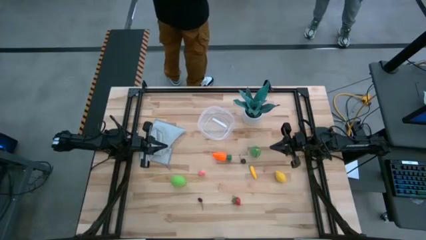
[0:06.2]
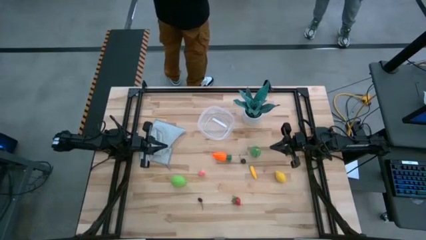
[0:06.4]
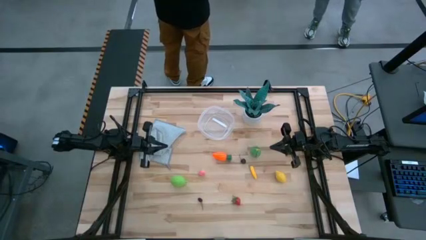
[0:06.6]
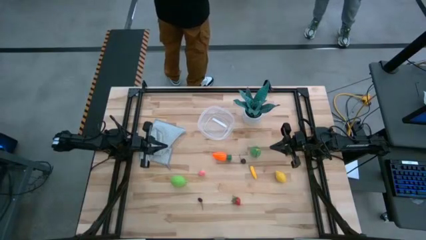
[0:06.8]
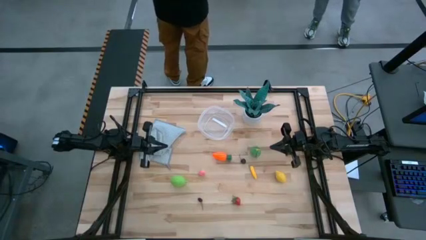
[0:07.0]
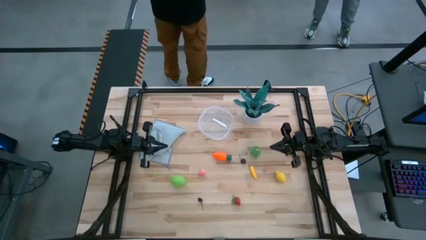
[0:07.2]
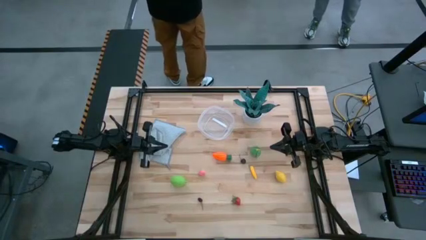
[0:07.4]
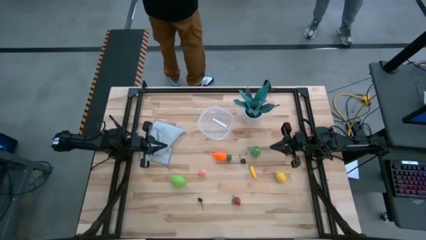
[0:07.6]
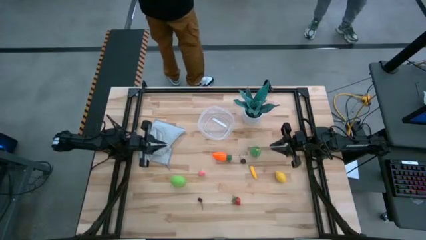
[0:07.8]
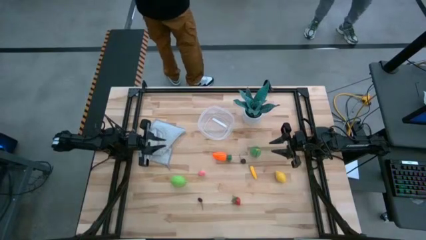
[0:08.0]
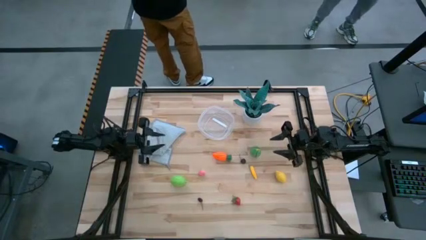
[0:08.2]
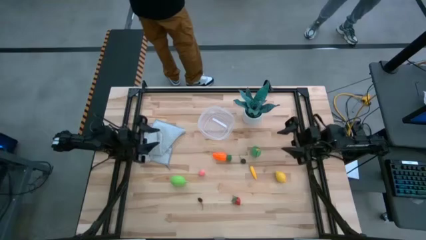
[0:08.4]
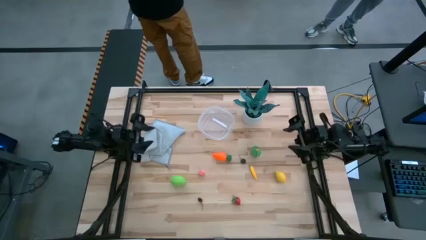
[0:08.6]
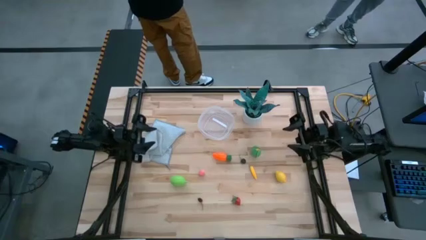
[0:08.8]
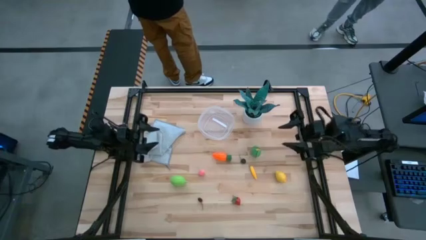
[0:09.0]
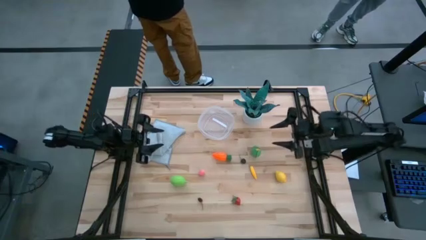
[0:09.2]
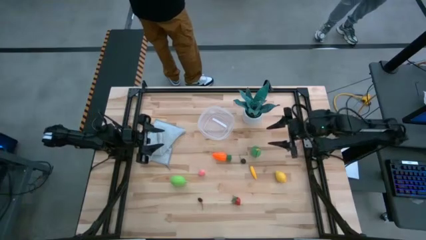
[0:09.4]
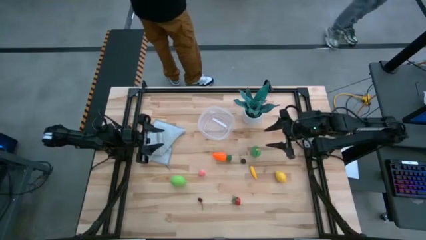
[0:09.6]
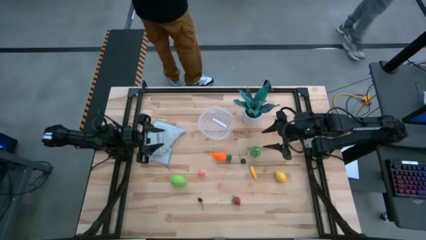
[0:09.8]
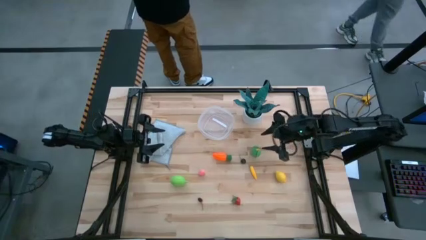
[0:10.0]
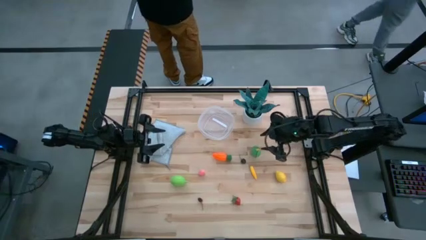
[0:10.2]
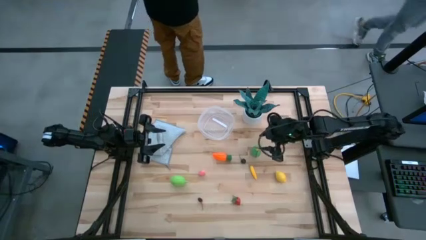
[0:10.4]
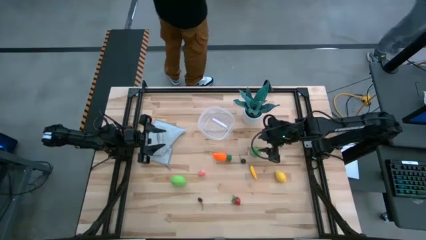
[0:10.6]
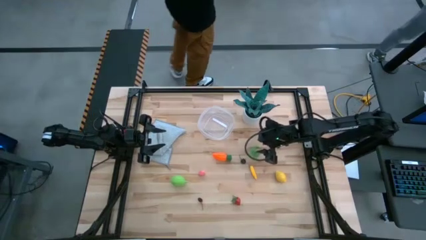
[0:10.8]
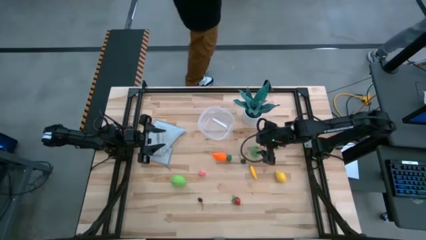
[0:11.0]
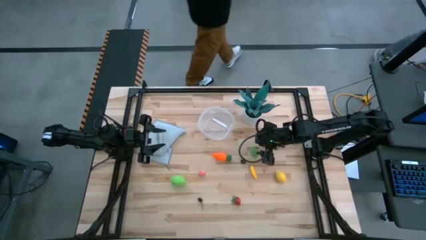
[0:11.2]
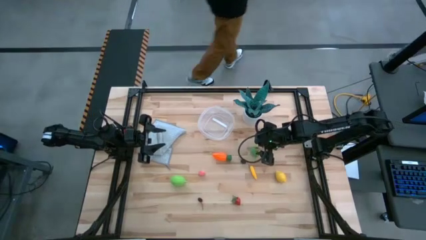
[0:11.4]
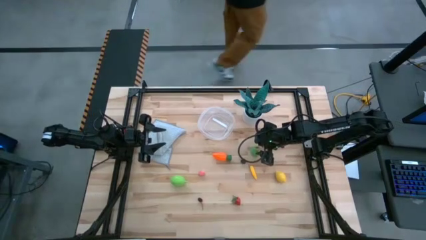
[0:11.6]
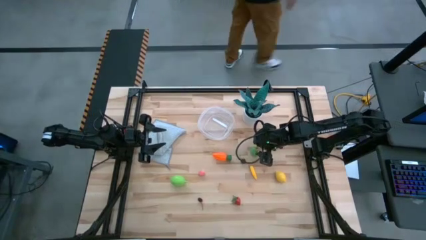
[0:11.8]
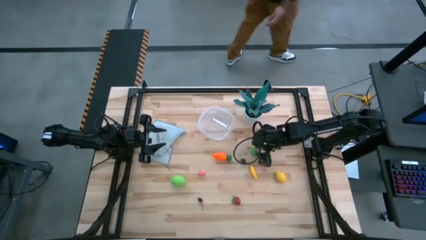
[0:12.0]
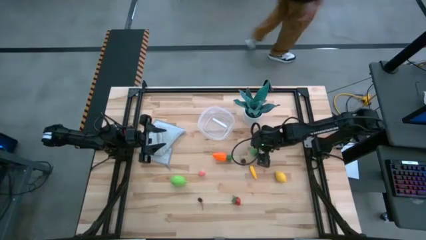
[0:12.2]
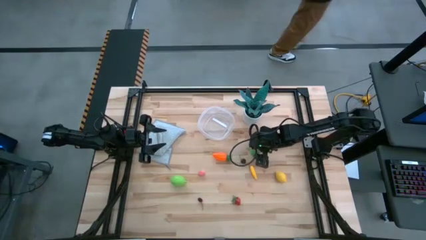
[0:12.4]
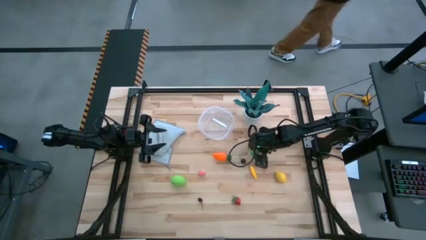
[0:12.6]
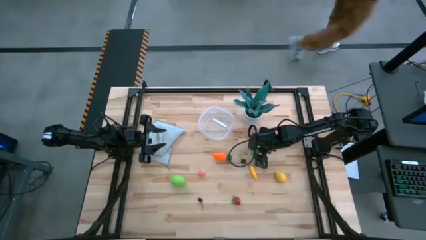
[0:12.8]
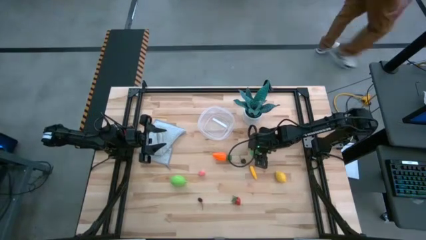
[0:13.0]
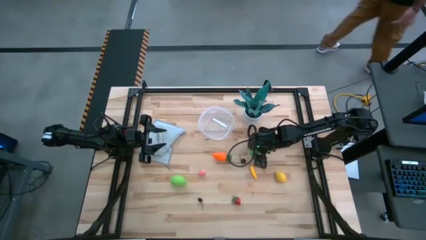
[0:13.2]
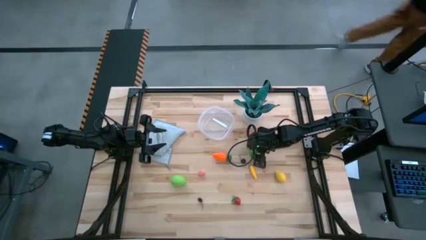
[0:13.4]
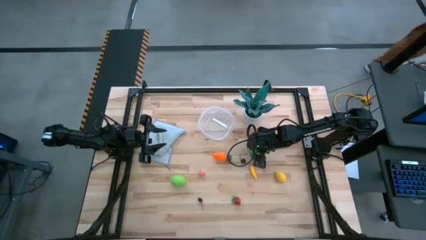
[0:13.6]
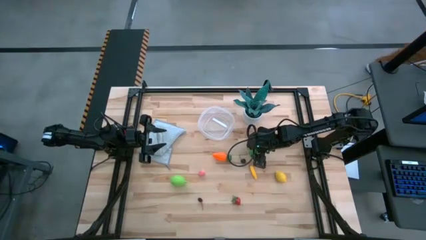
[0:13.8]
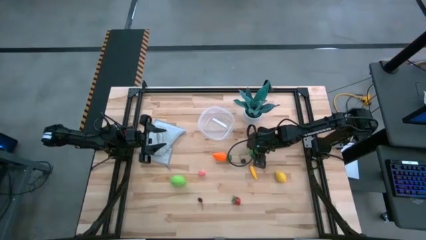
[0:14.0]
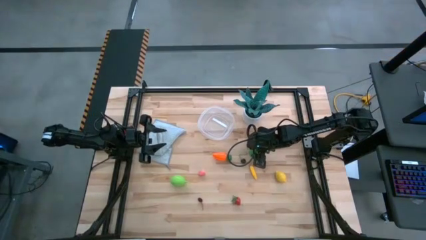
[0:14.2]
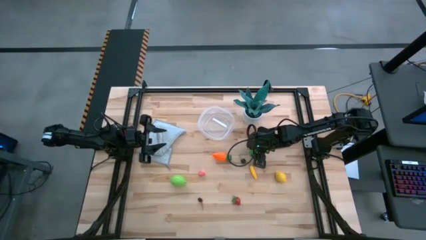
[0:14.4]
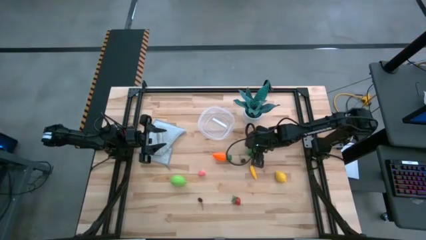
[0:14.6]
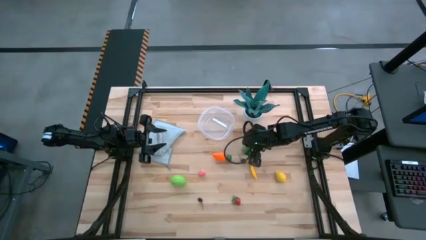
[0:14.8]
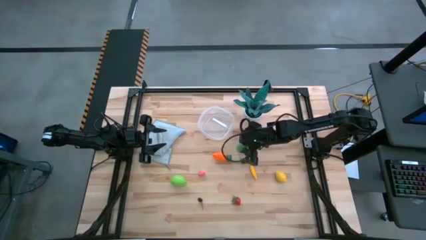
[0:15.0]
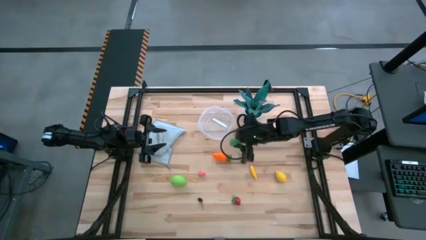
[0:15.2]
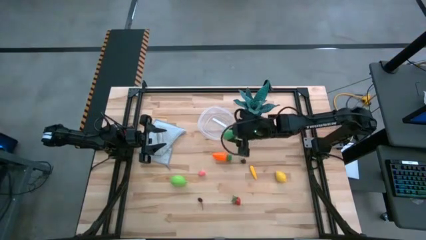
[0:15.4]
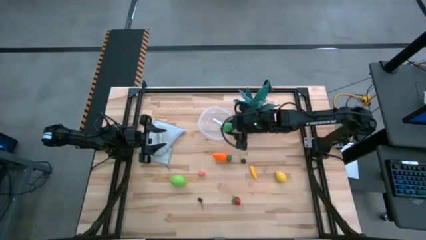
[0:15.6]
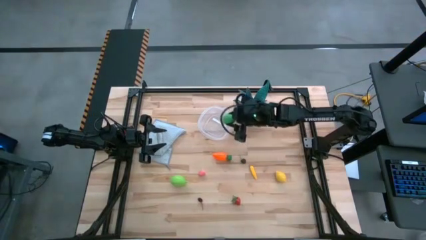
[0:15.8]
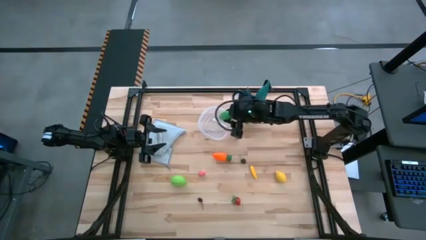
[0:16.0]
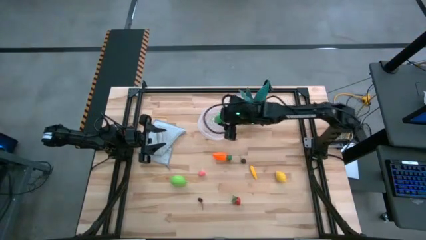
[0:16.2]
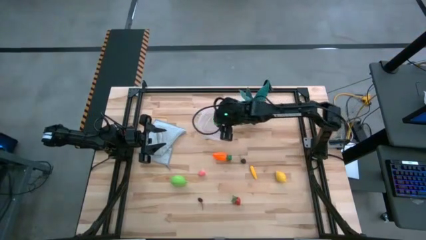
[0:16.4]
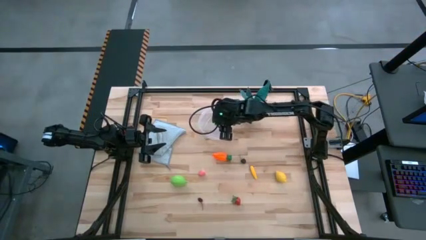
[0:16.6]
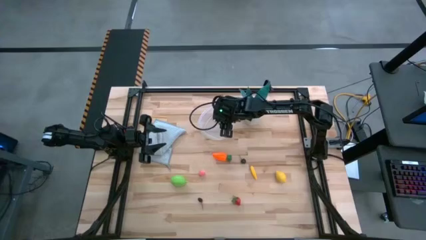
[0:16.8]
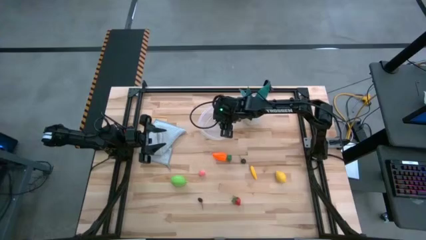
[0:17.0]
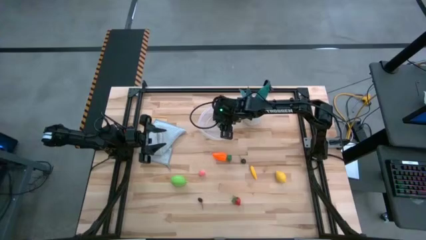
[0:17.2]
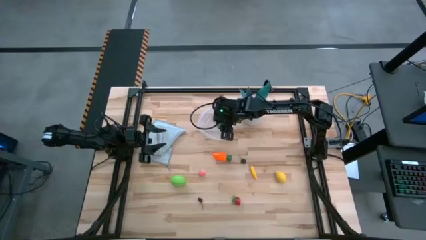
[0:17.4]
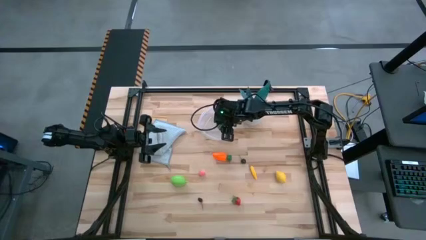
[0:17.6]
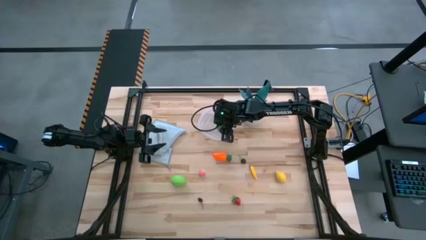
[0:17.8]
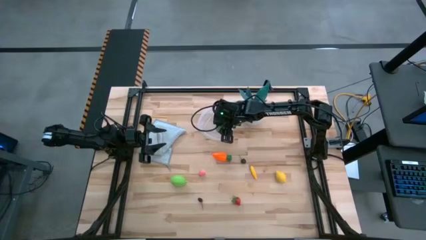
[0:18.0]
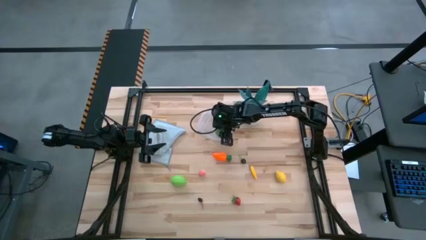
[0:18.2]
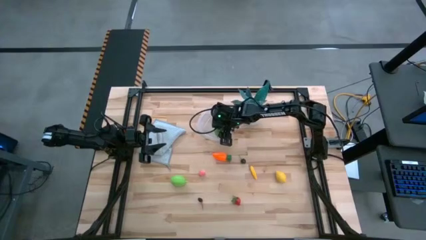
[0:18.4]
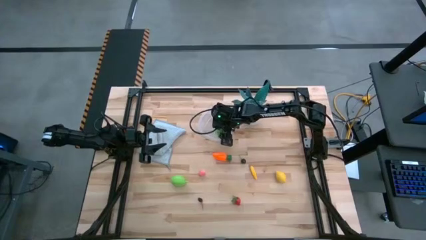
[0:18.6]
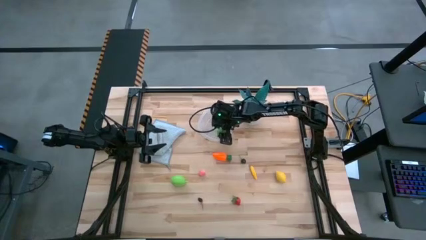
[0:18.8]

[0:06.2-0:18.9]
Task: Pick and placing Produce into tupperware
Put the green corn into the transparent container

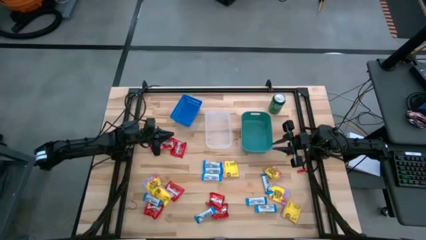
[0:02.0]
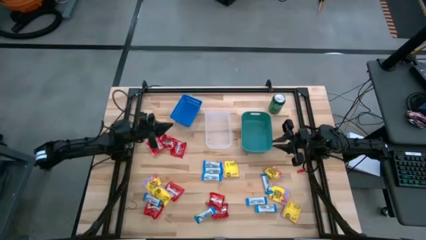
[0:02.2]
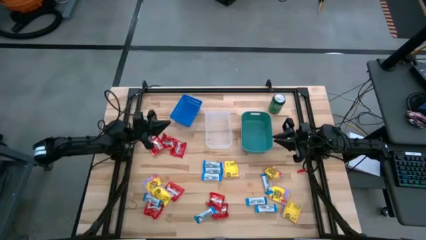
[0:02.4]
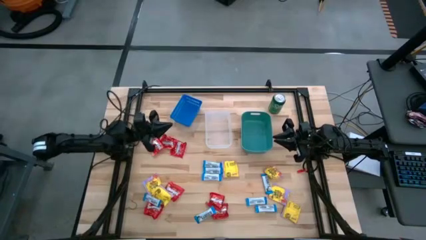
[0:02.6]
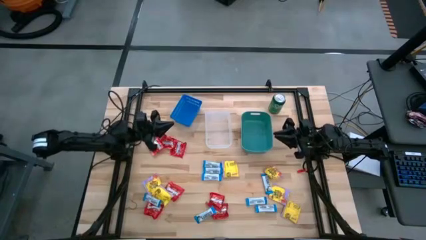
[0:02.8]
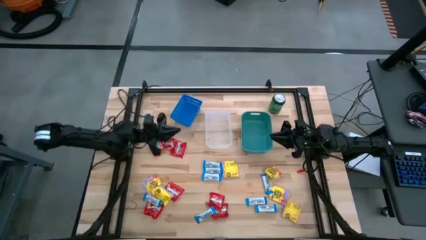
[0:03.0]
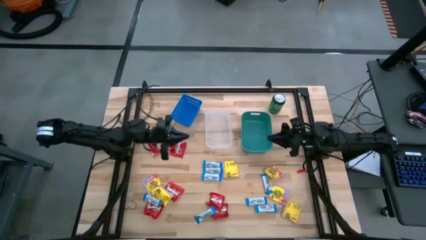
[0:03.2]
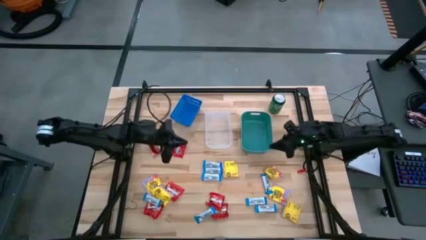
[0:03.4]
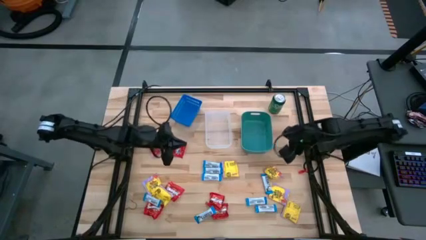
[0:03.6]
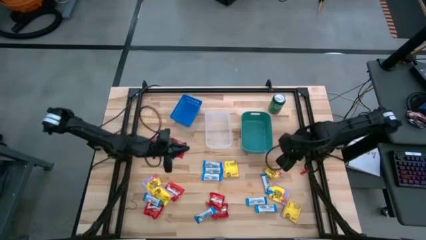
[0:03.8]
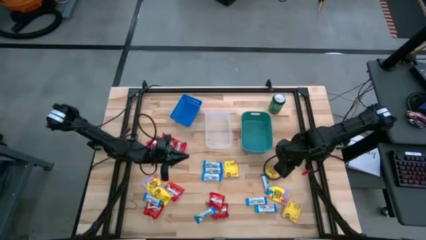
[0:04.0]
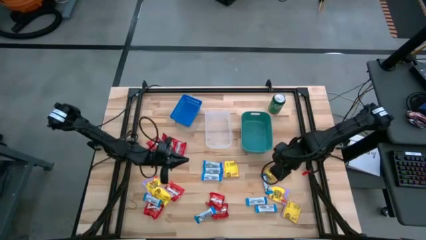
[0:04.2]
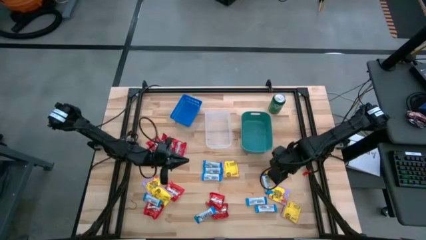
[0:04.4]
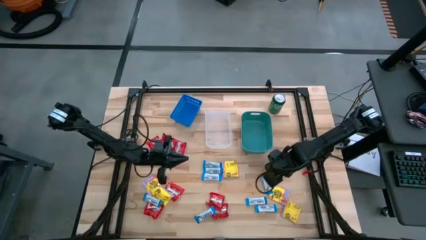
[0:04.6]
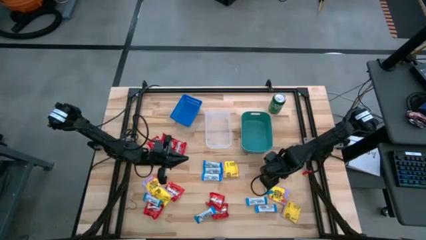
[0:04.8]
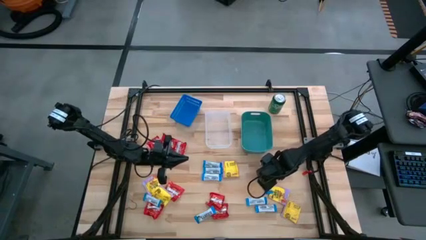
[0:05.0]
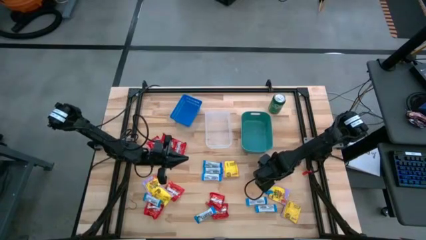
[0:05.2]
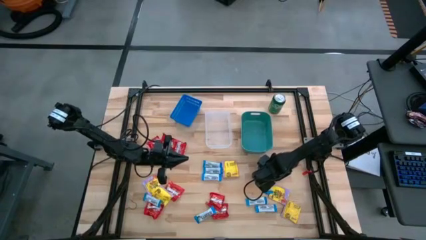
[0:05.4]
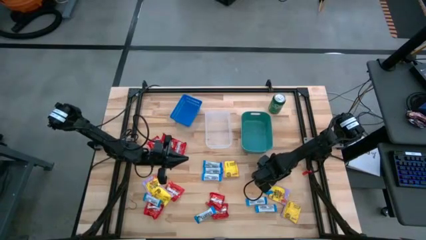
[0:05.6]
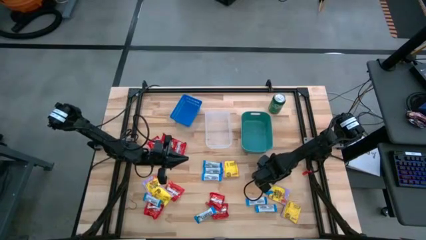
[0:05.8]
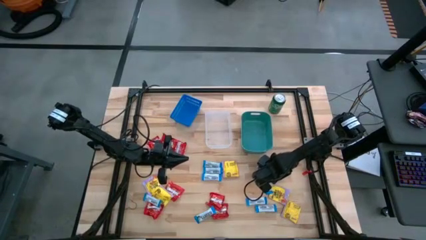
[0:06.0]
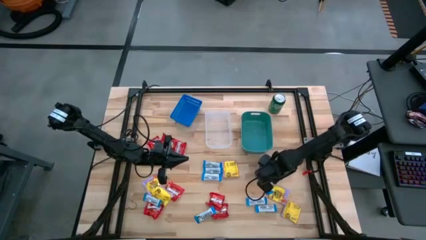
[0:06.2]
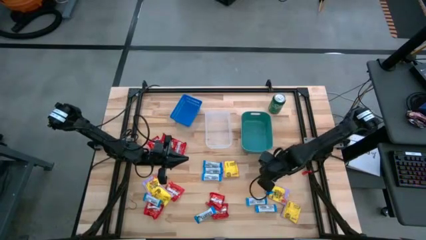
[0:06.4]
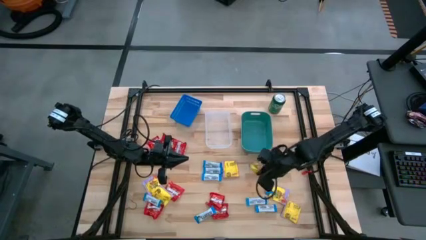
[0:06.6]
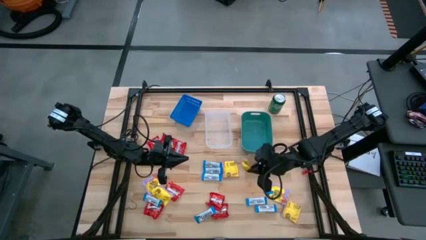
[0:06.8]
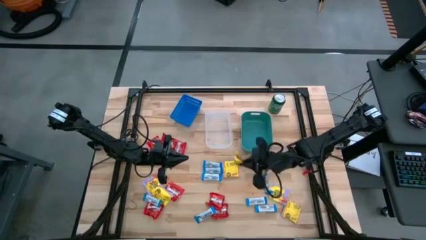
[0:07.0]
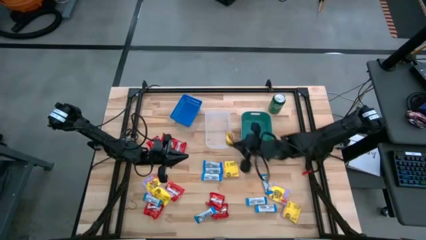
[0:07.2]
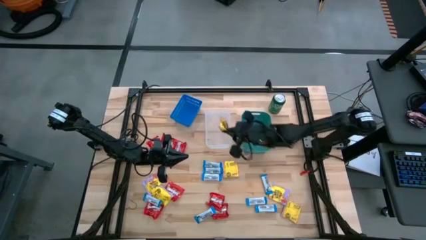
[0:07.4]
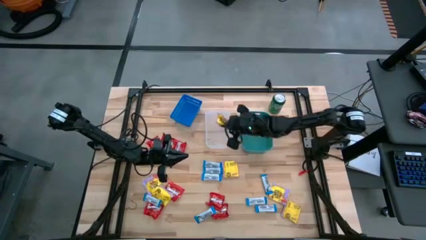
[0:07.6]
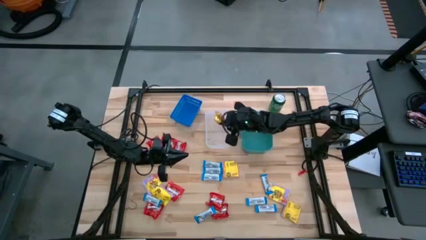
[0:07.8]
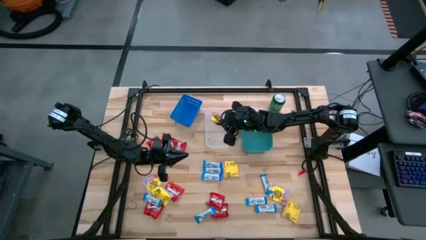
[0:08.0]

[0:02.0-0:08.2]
Task: Sort candy
Put the yellow candy into the transparent bin
